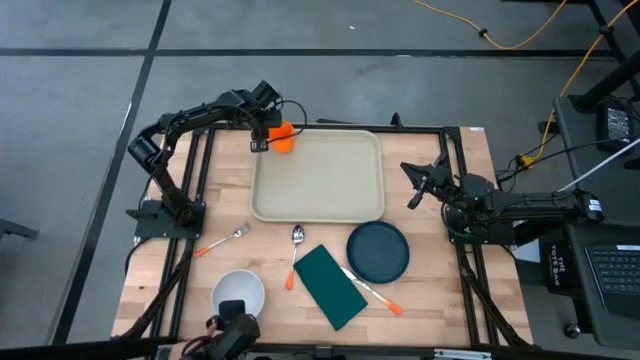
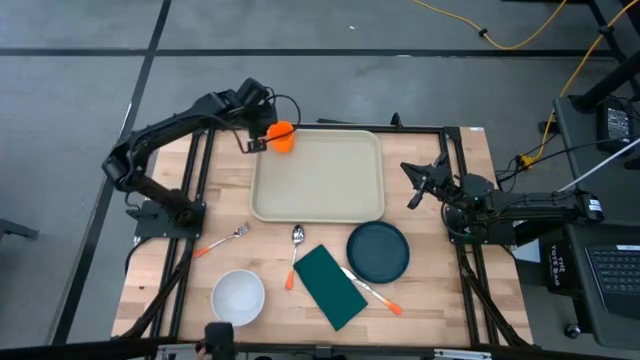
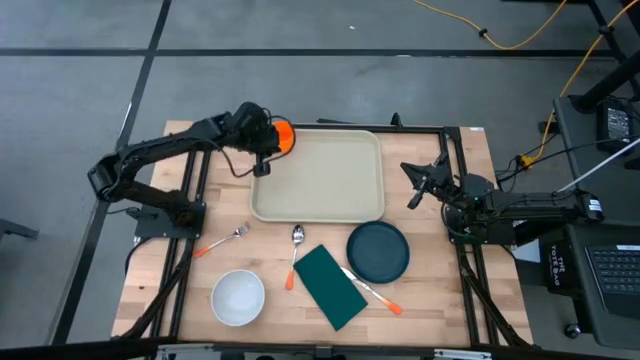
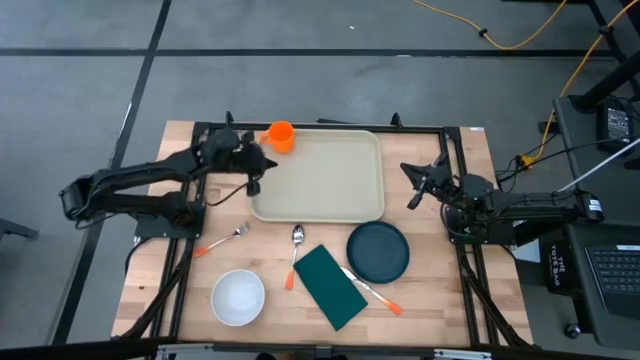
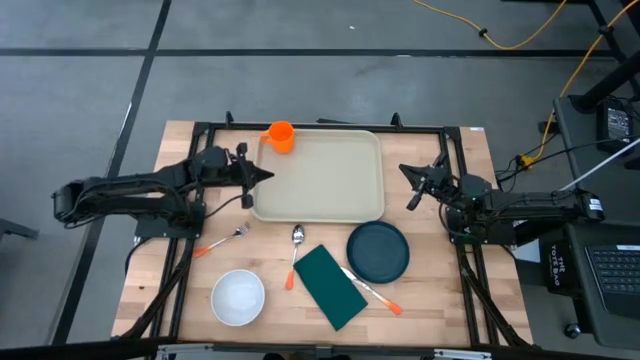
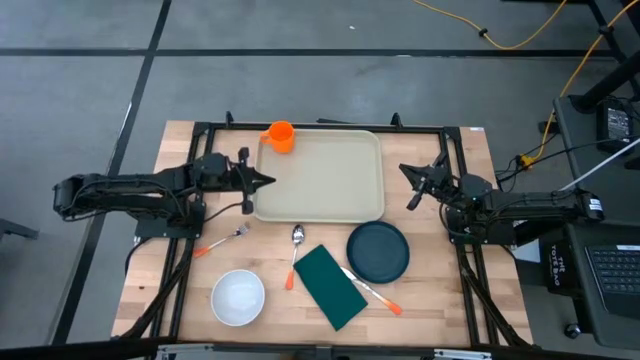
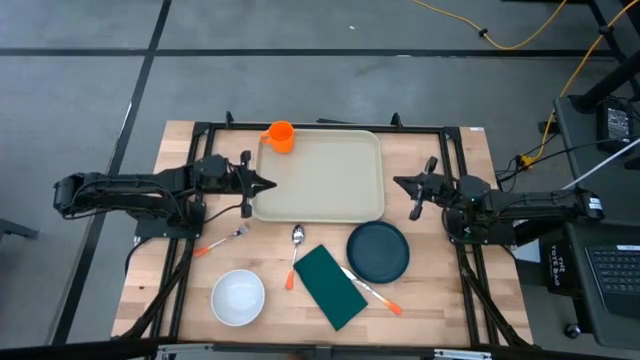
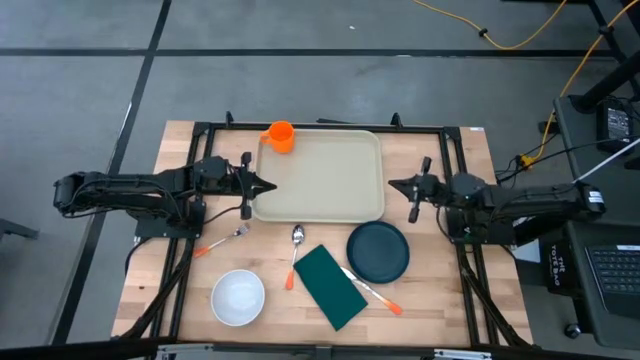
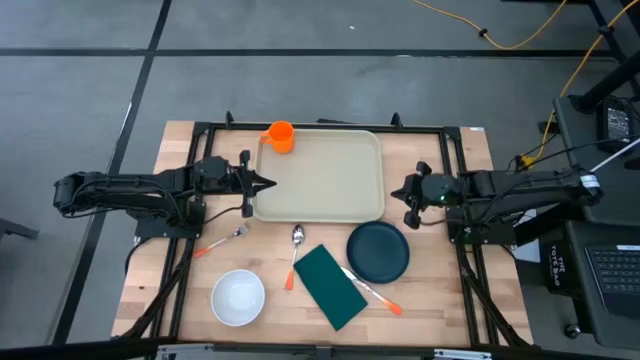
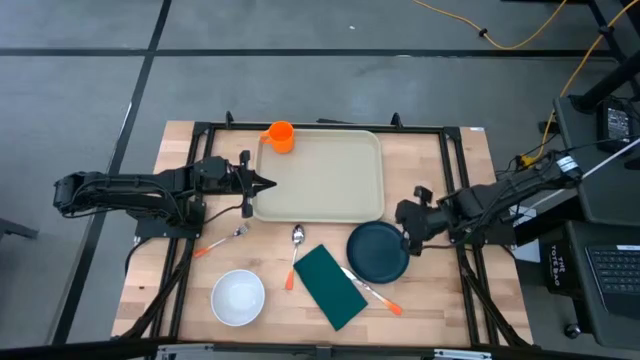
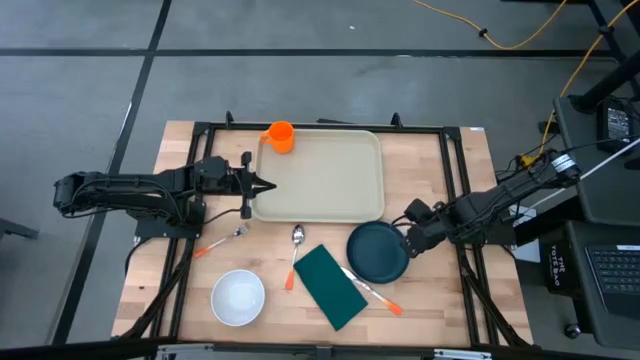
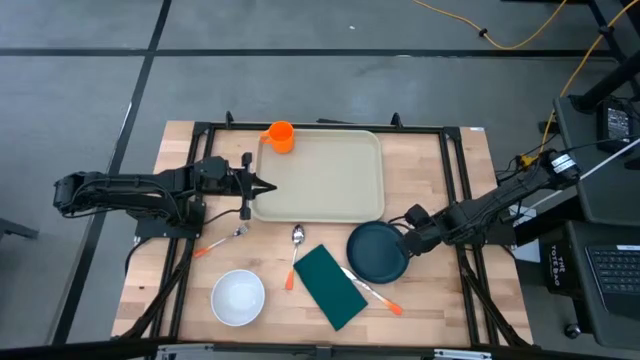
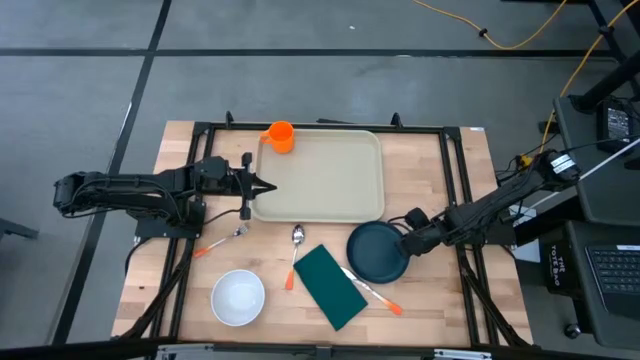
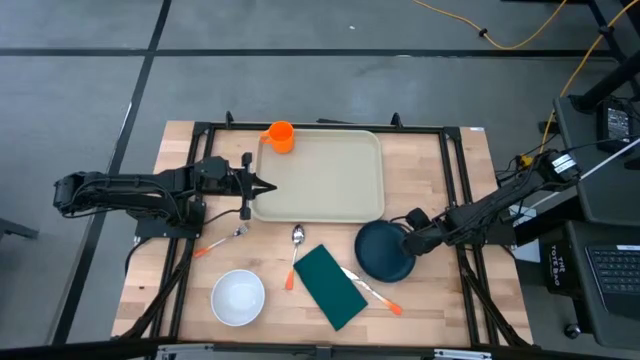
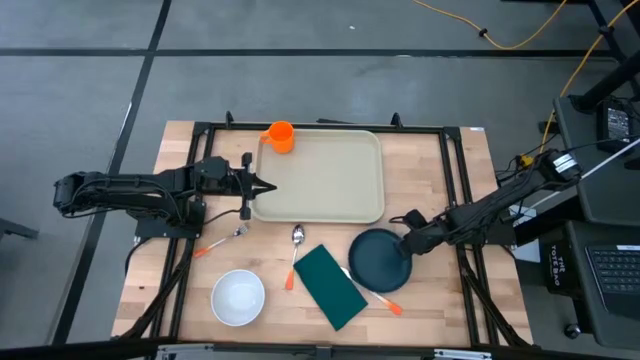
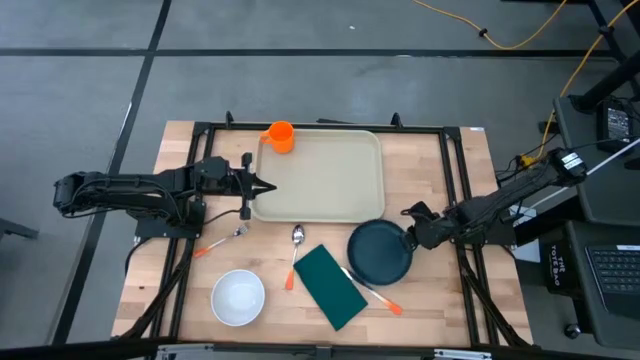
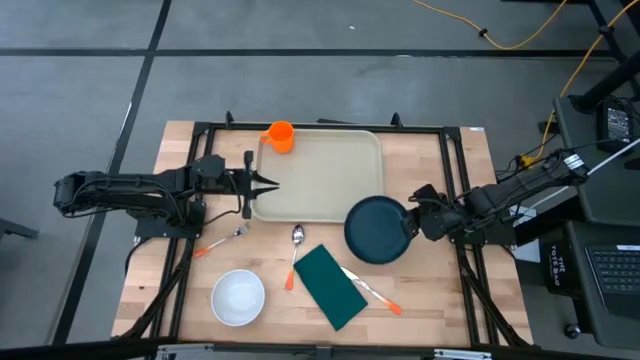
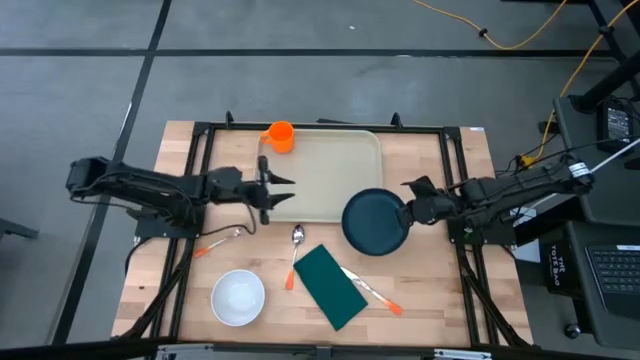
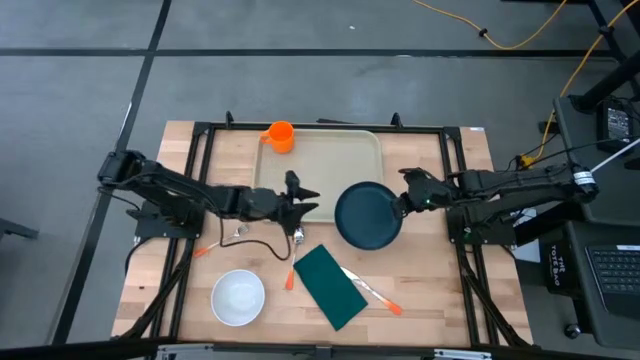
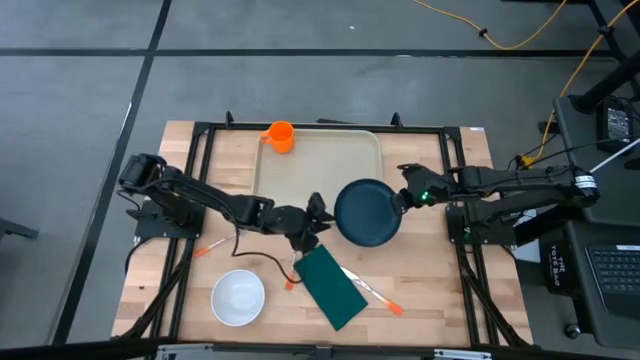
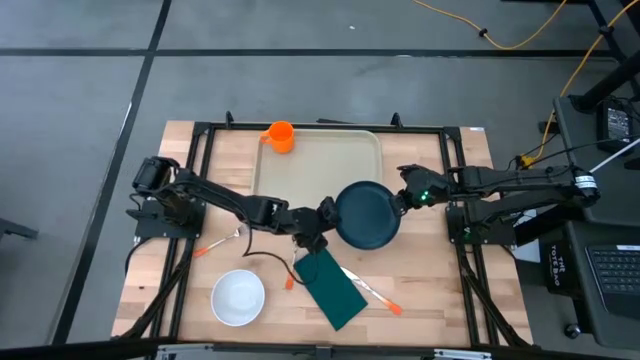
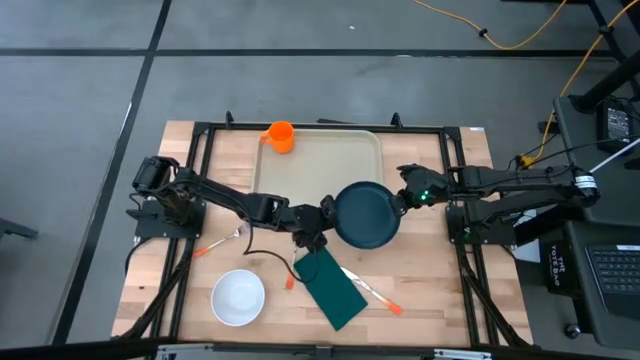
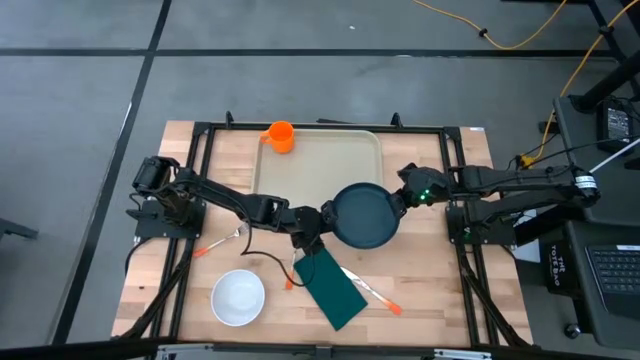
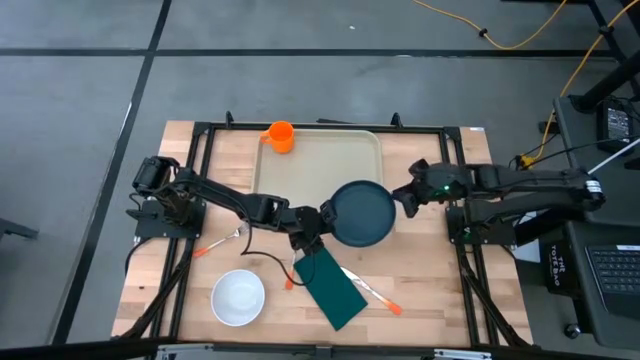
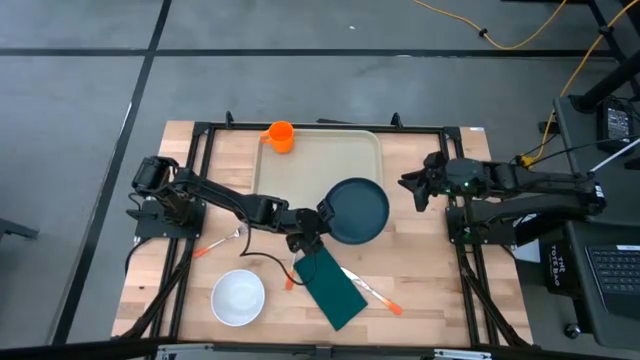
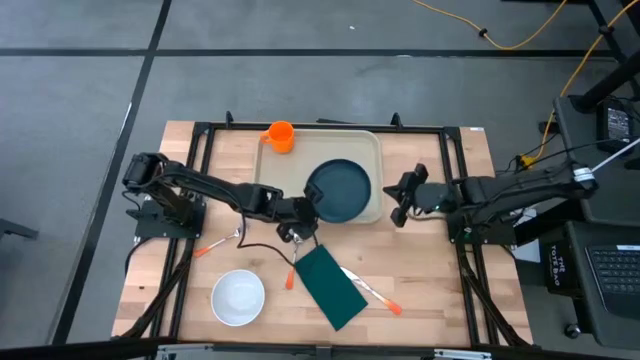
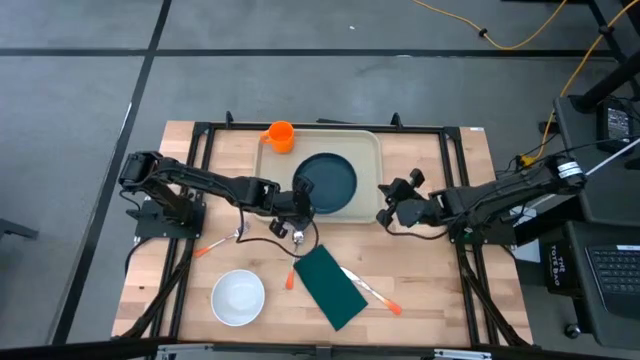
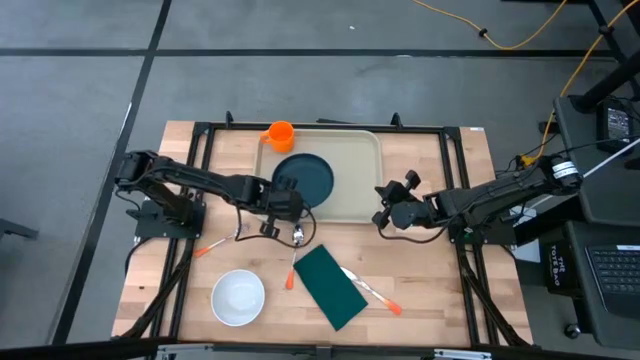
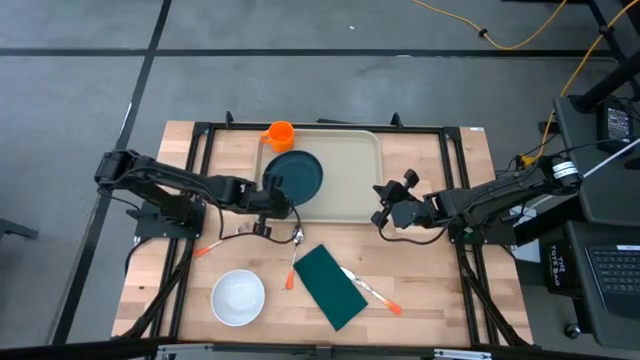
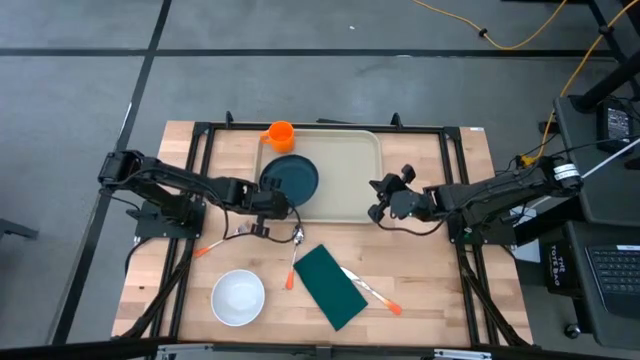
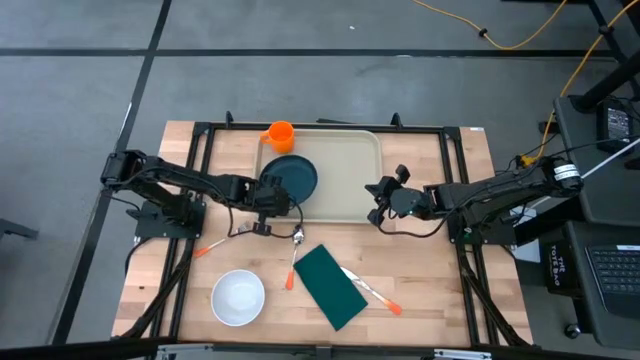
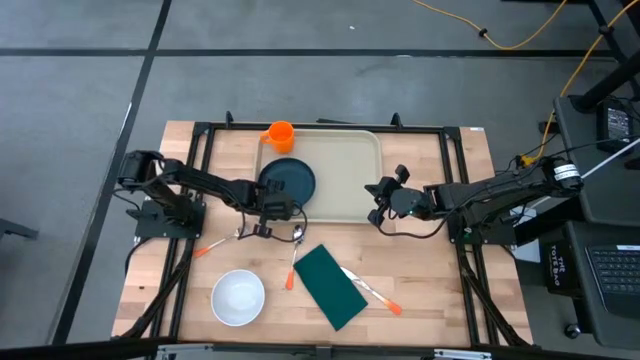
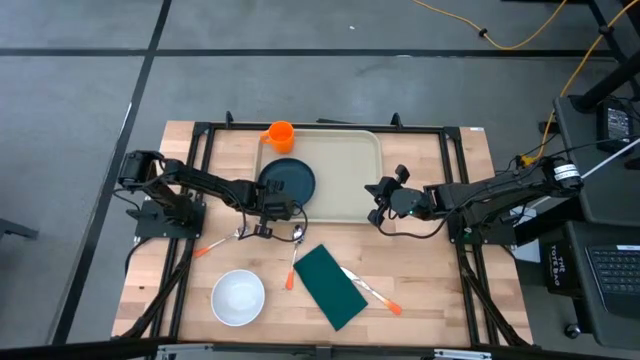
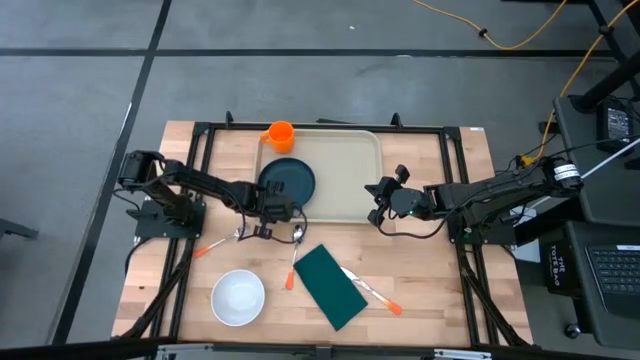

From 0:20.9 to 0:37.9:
Task: Set up tray
Put the green plate on the brown serving tray below the orange mug

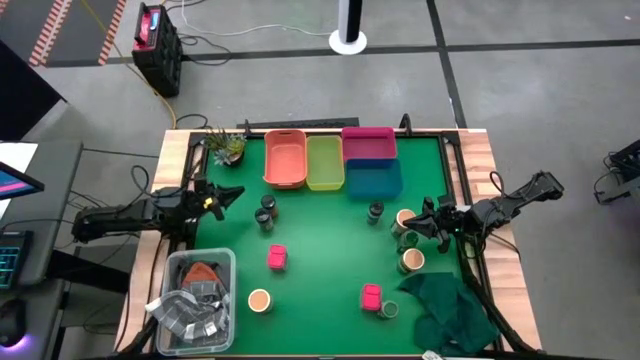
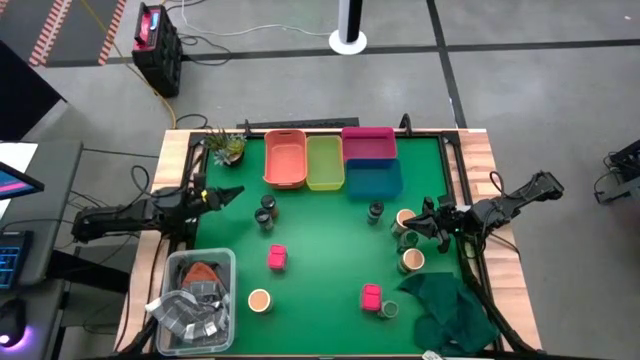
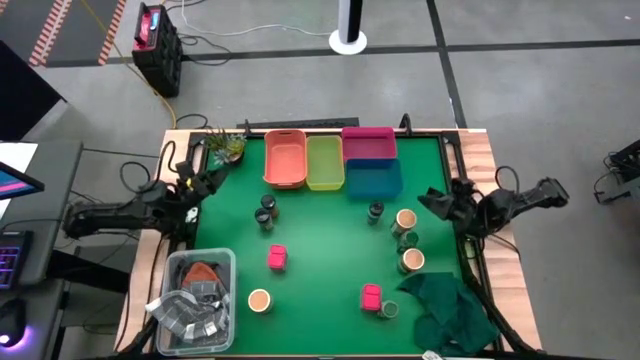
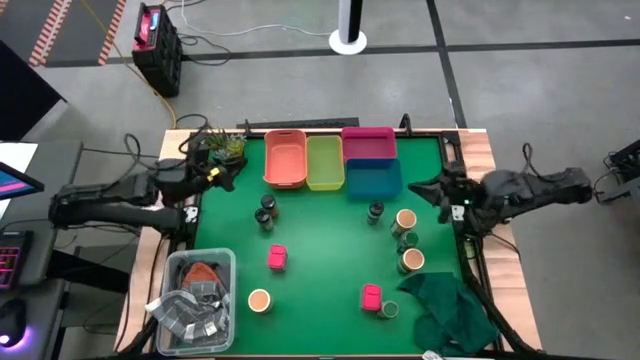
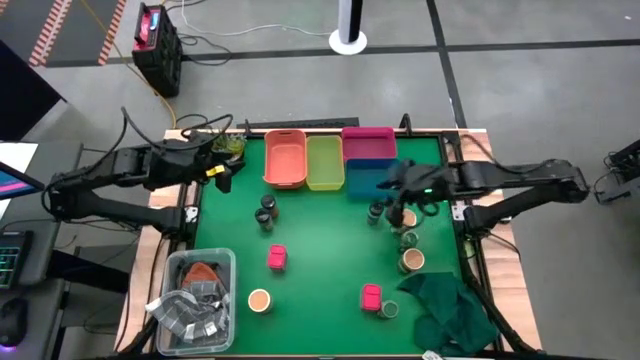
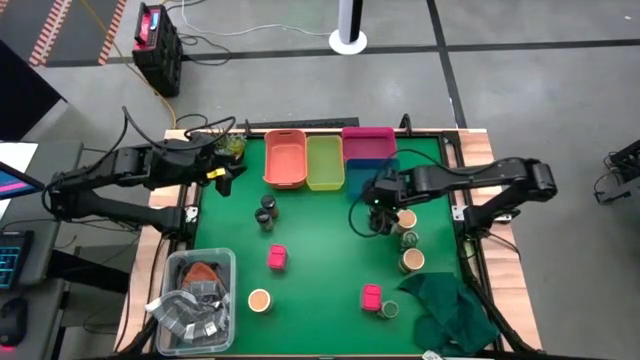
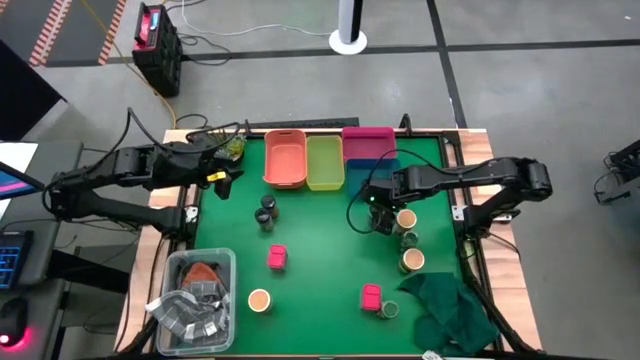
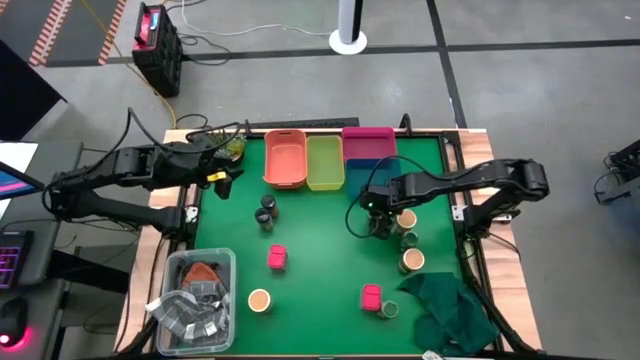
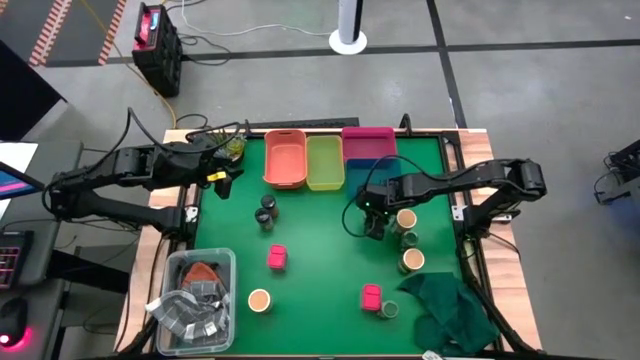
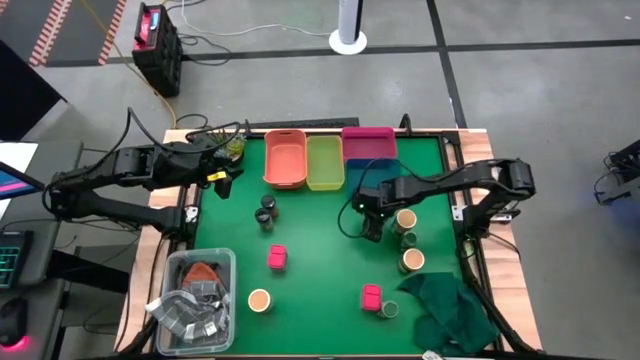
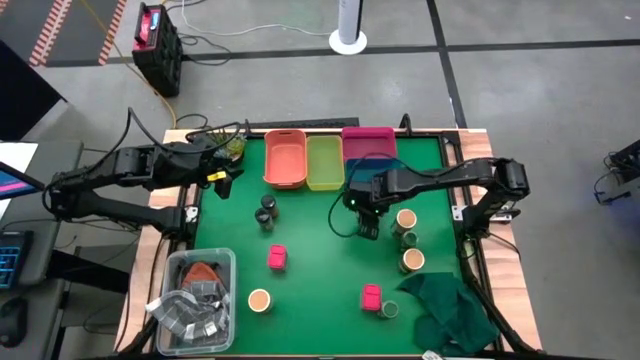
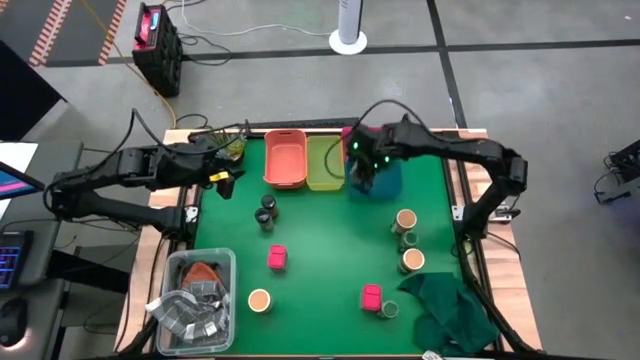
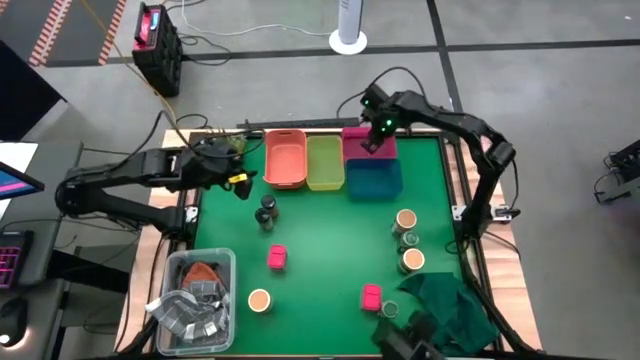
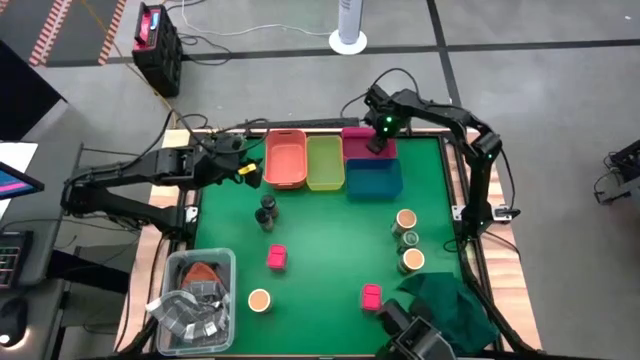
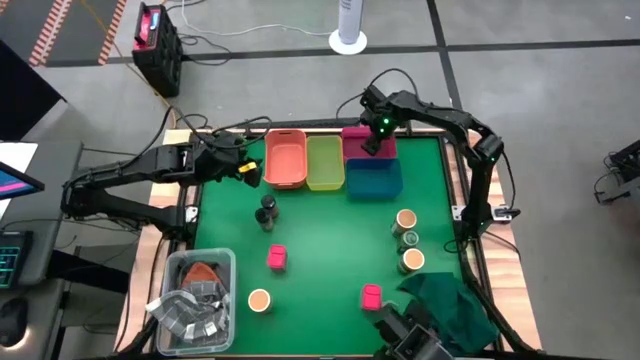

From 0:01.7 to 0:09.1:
Task: Sort spices by type
Put the top right black seasoning bottle into the pink bin
